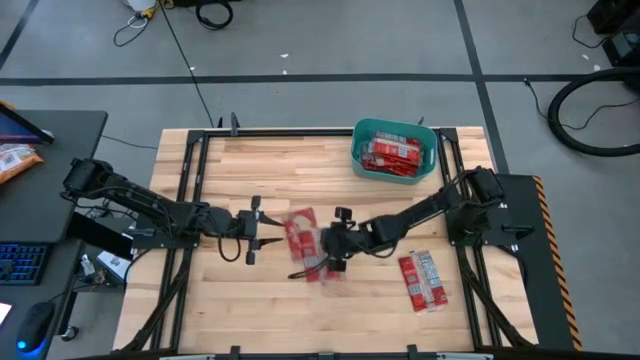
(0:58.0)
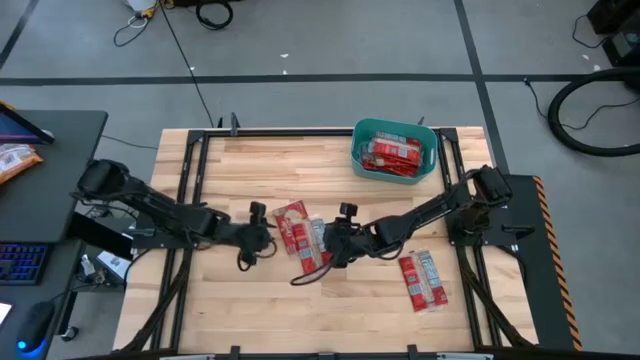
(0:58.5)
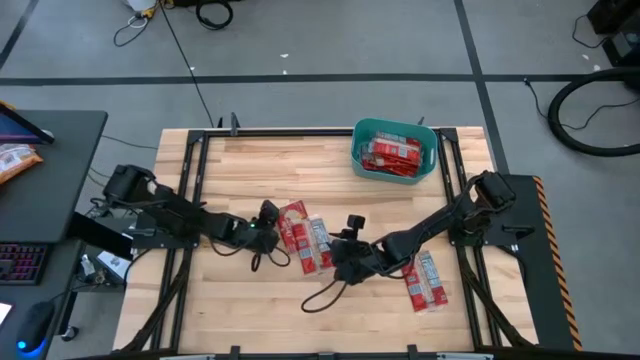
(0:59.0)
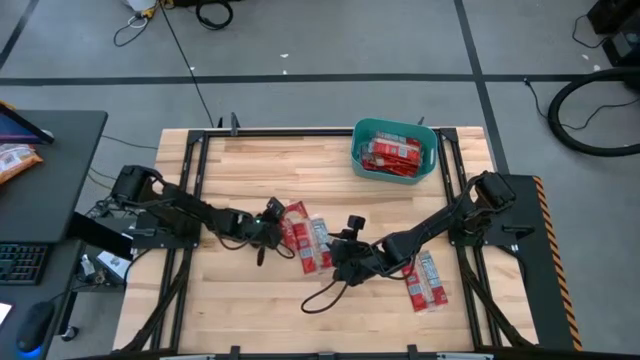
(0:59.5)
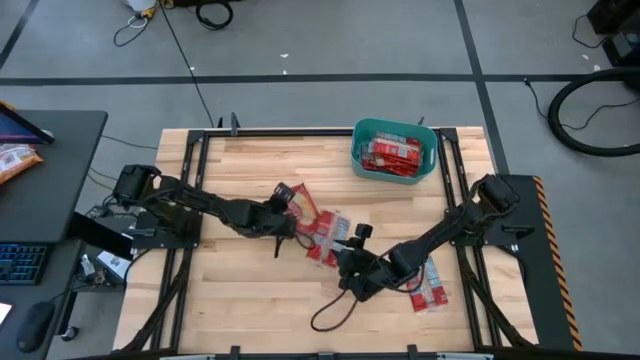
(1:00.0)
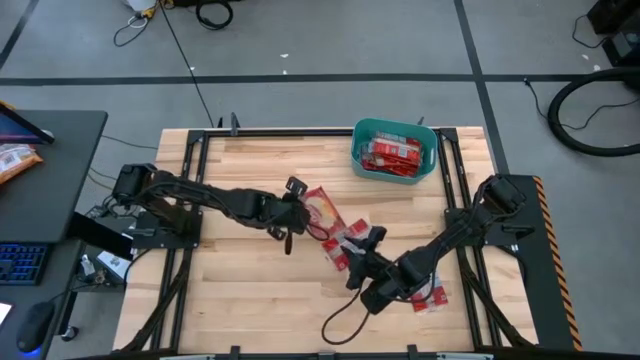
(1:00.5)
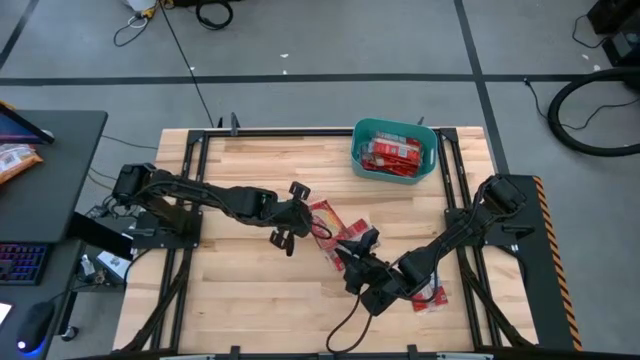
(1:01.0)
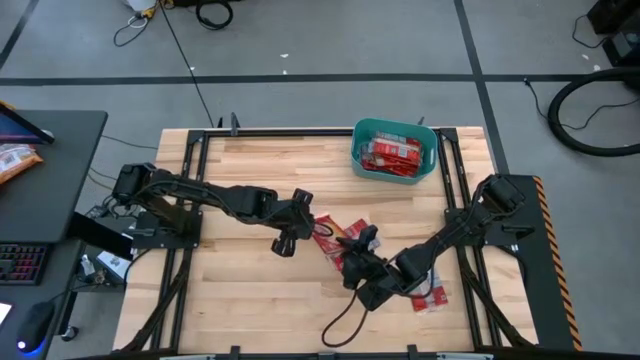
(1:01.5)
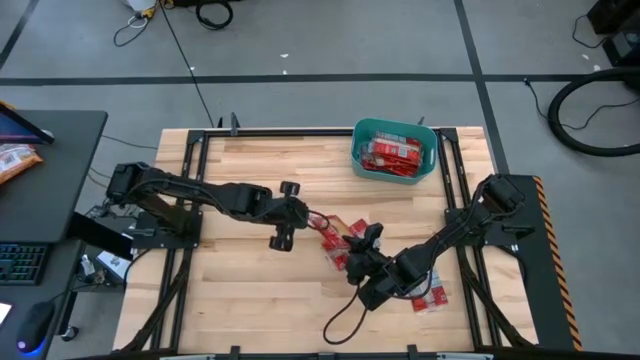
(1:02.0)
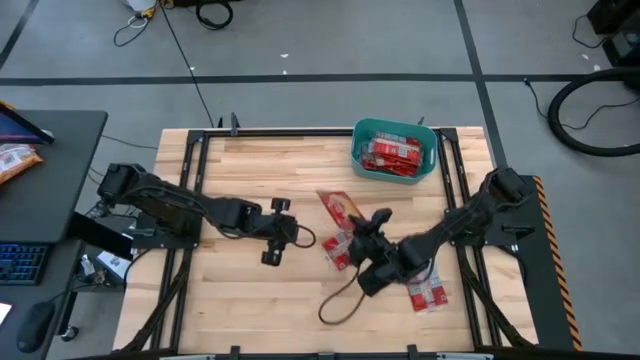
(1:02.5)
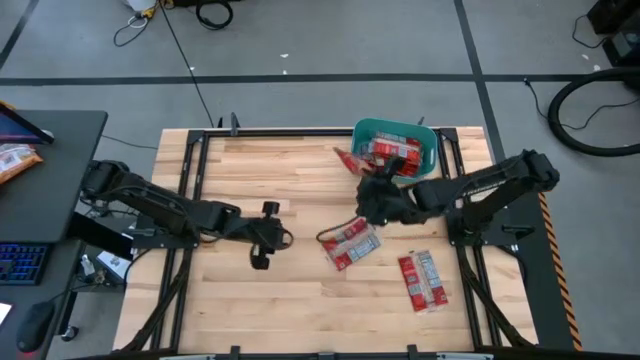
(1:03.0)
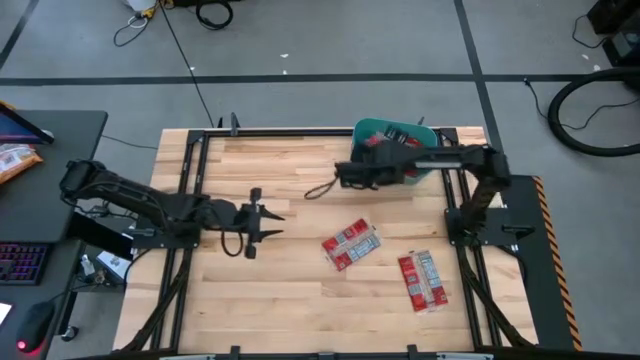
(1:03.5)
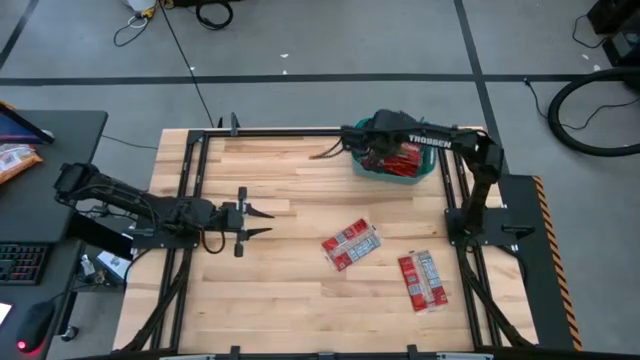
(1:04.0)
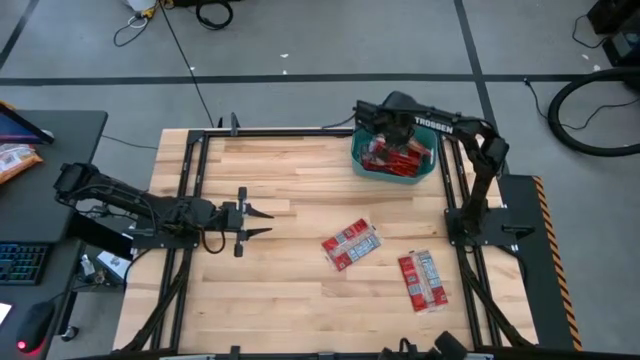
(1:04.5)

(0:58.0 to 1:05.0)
Task: Sort popcorn bags into baskets
Put the red popcorn bag into the green bin

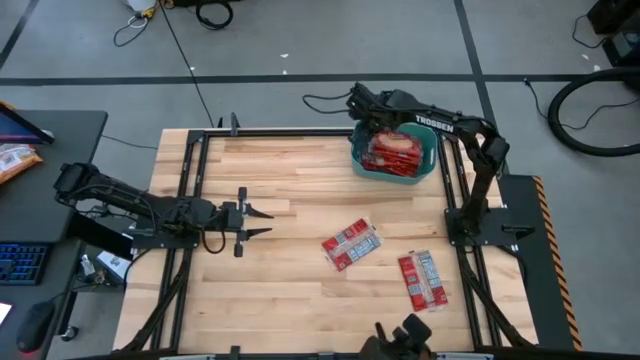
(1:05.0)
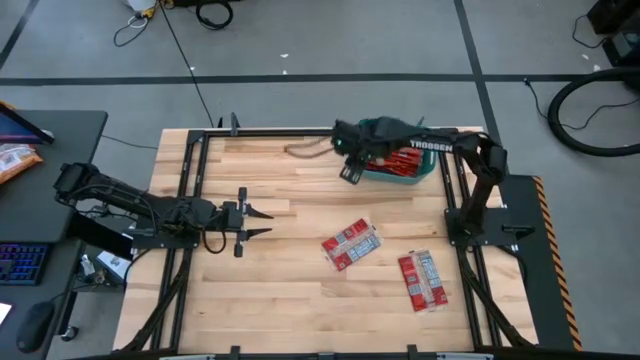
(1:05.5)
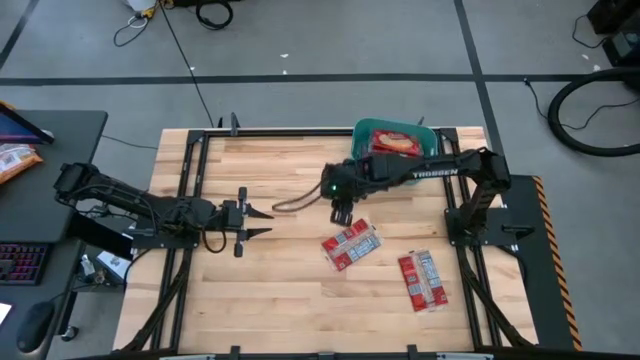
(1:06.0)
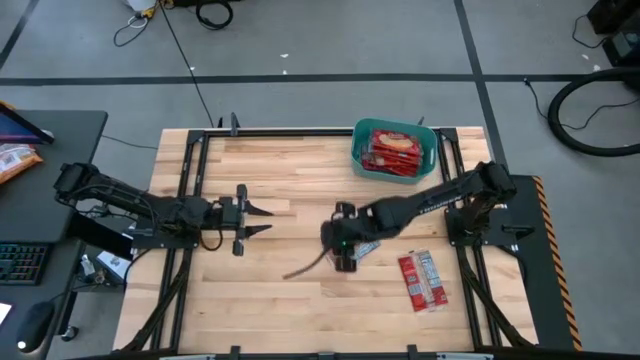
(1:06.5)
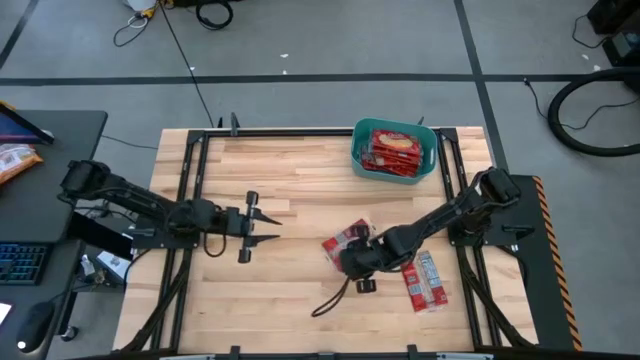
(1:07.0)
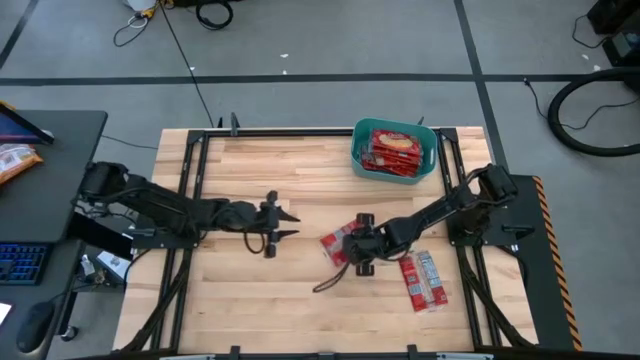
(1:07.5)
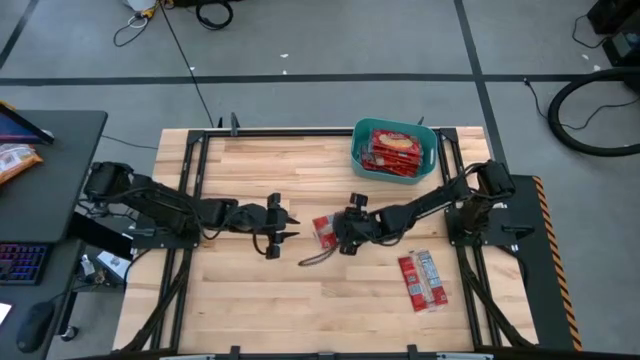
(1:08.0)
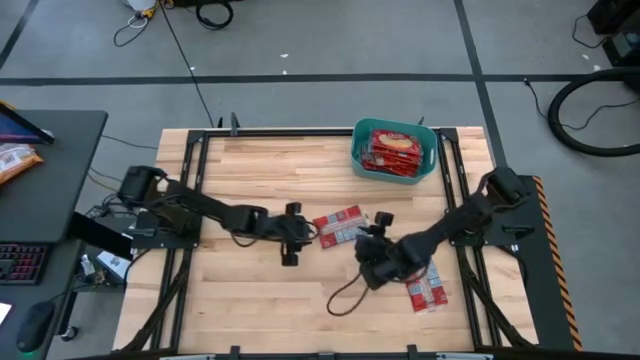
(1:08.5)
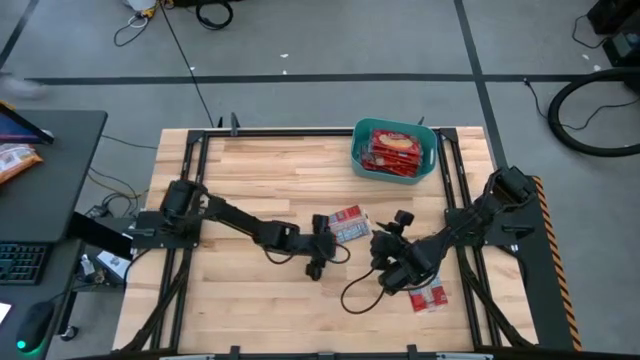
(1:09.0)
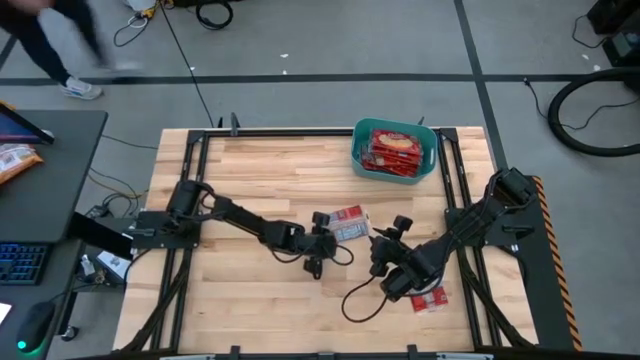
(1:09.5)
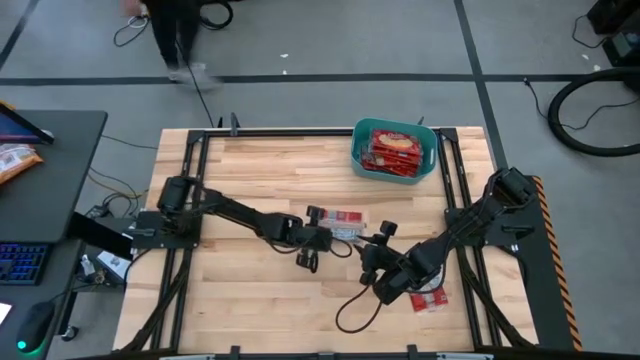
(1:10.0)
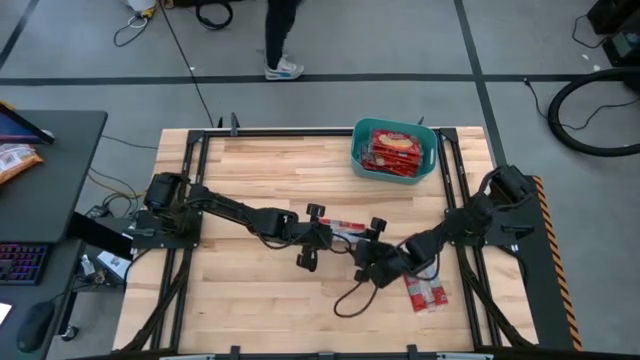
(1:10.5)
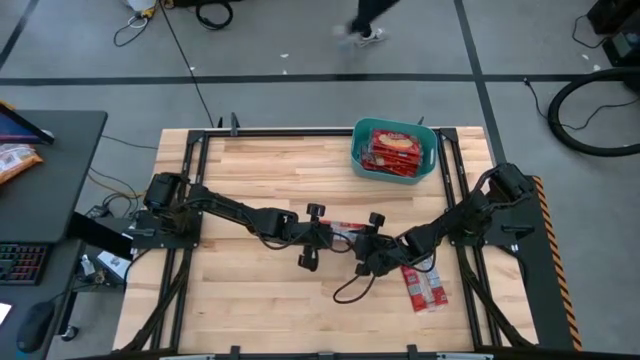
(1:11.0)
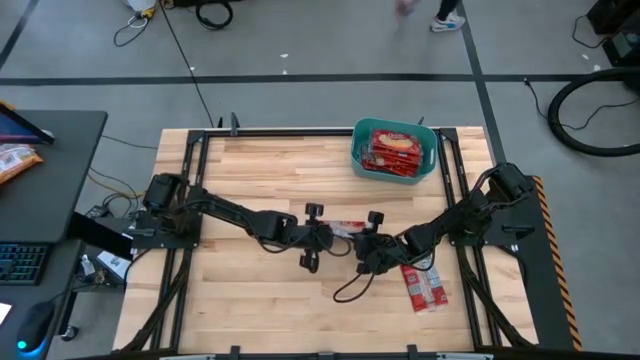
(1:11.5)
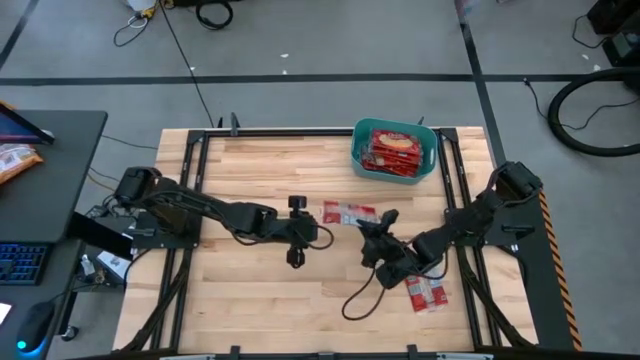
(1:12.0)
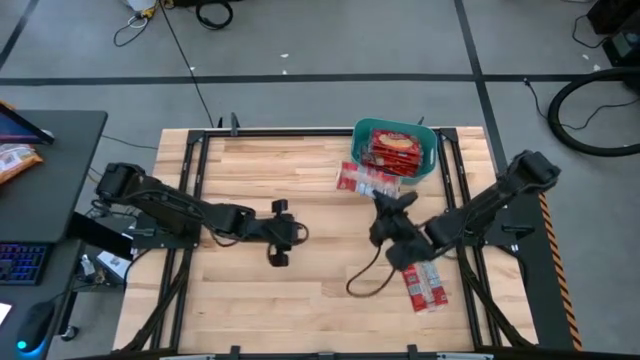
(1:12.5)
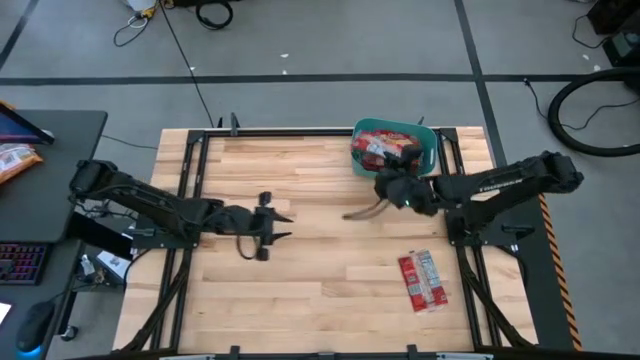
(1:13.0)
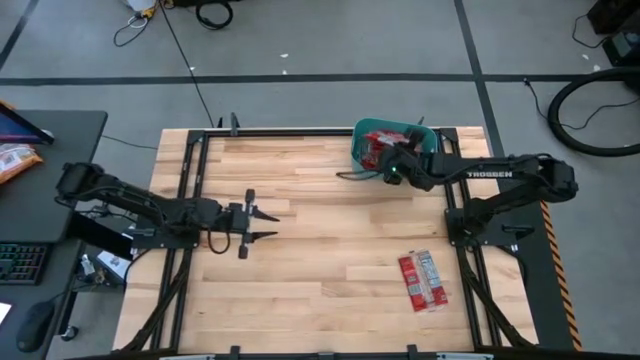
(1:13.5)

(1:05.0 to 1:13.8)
Put the red popcorn bag into the green bin

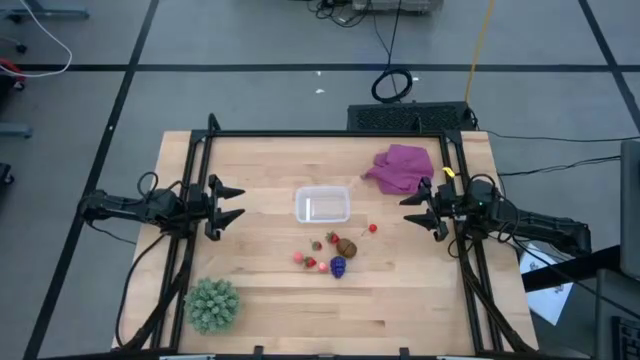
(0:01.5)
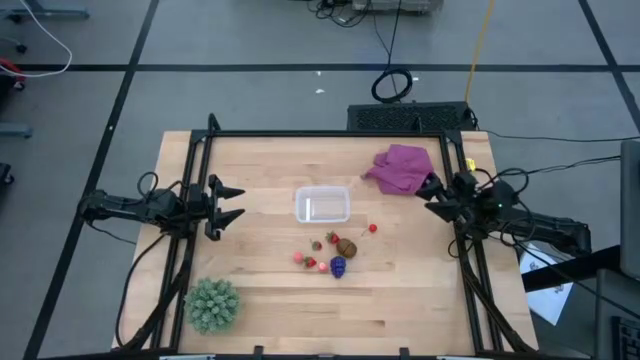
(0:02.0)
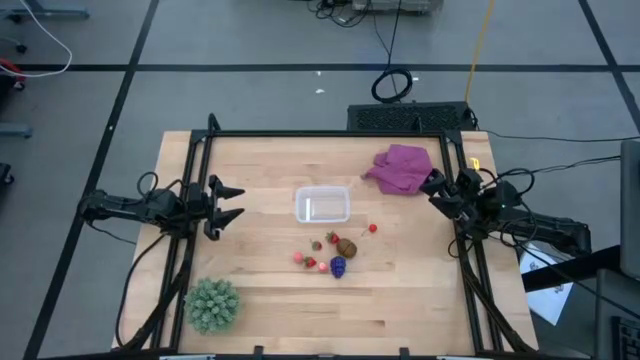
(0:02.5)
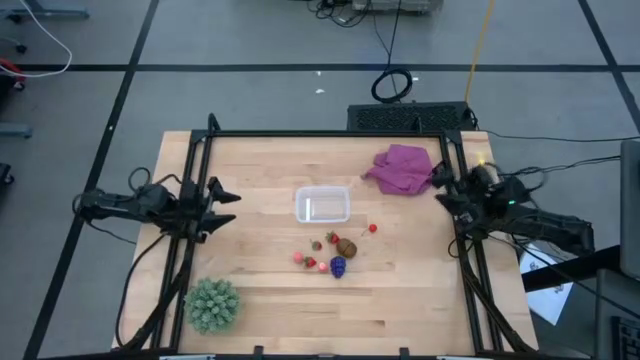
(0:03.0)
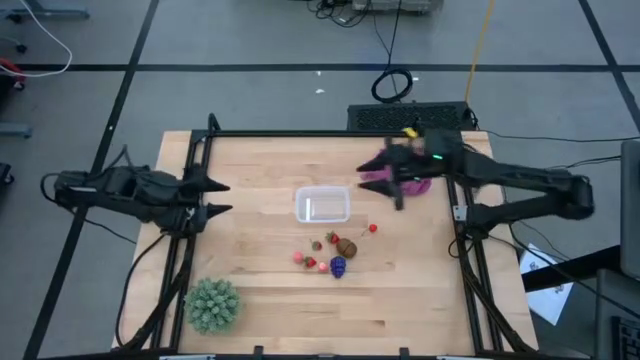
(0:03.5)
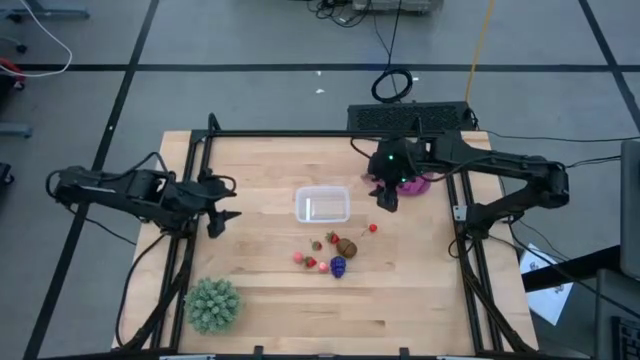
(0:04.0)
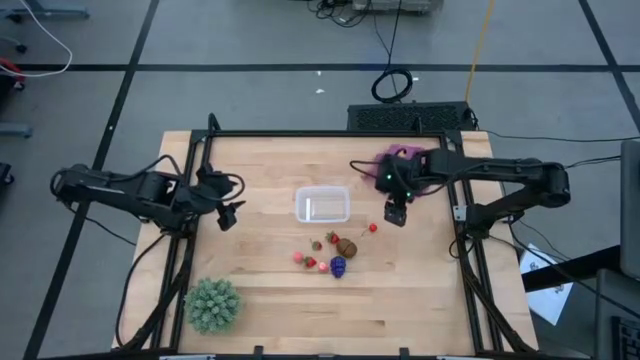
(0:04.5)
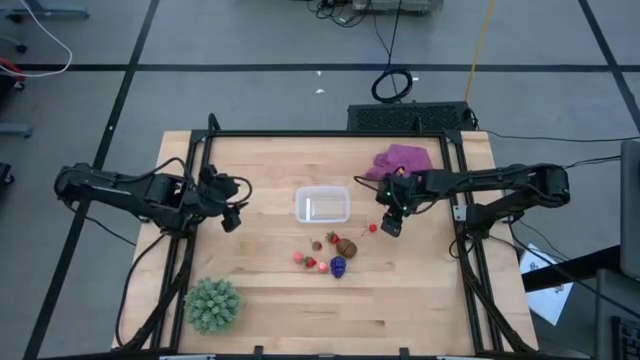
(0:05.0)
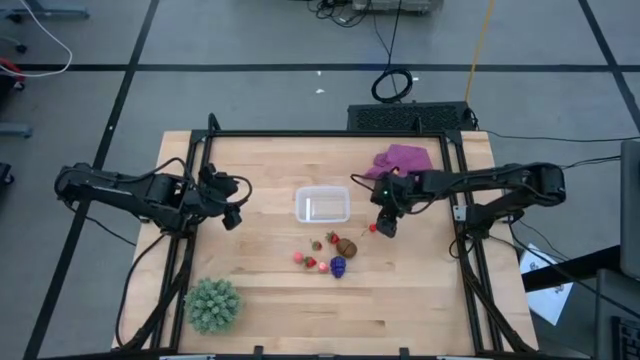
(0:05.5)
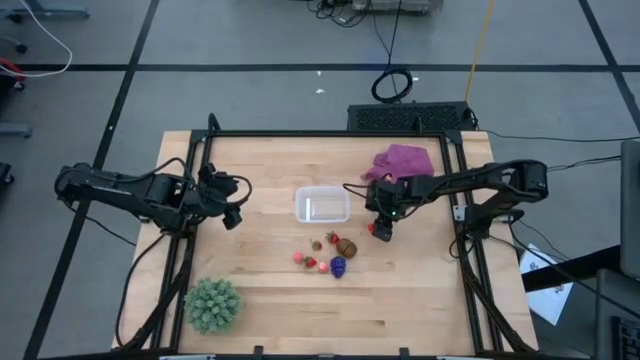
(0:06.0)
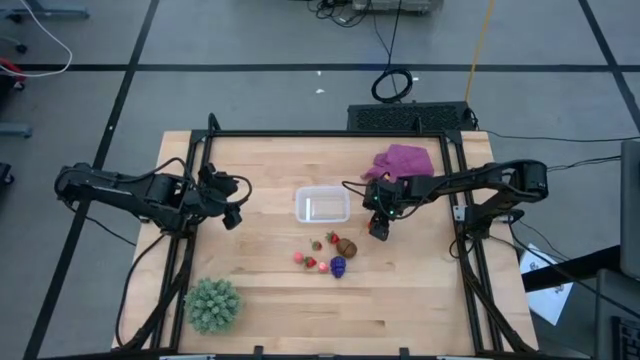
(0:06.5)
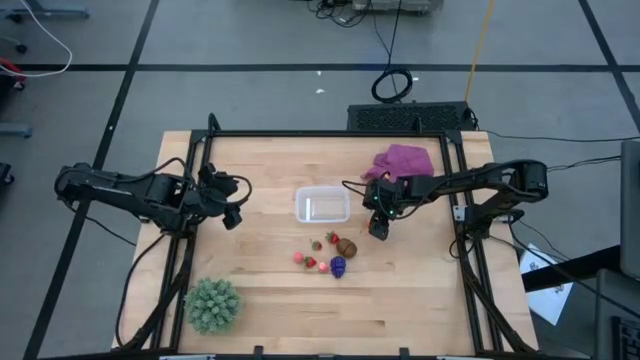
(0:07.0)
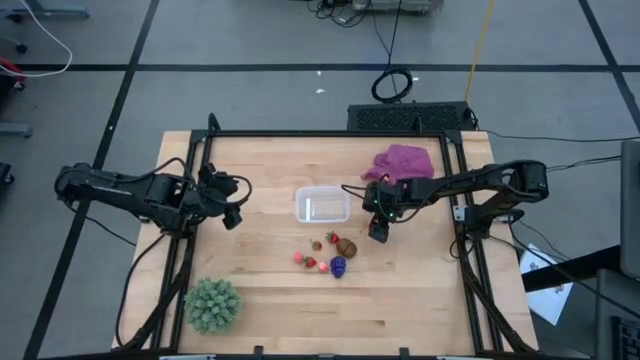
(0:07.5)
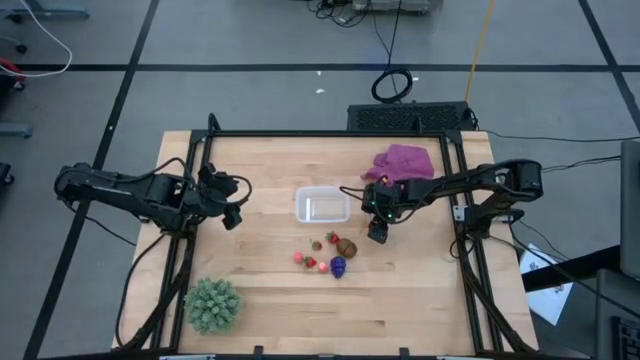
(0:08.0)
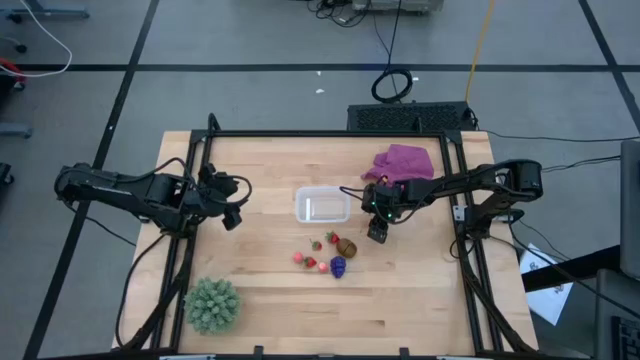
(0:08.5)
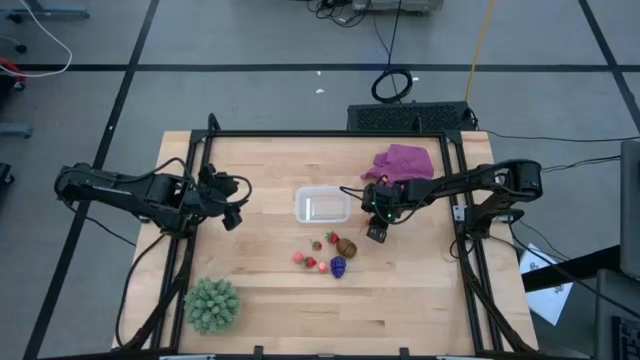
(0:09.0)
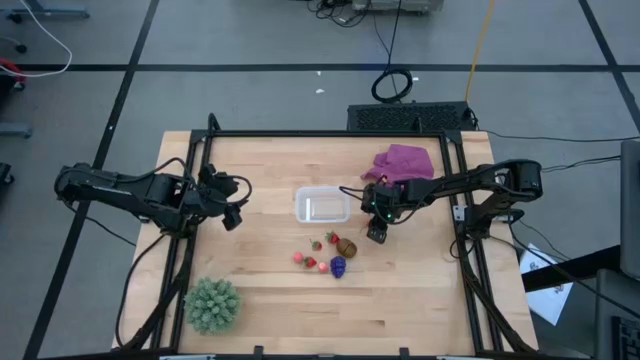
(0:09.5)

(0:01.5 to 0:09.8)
Task: Pick and placing Produce into tupperware
Put the cherry into the transparent bin
